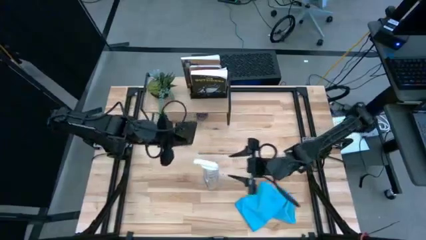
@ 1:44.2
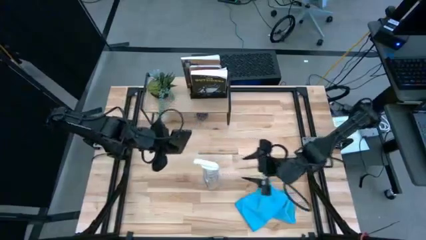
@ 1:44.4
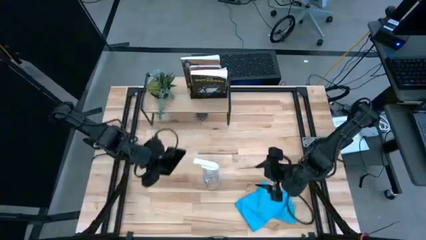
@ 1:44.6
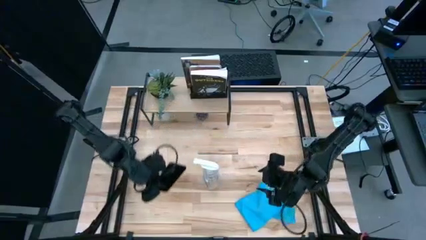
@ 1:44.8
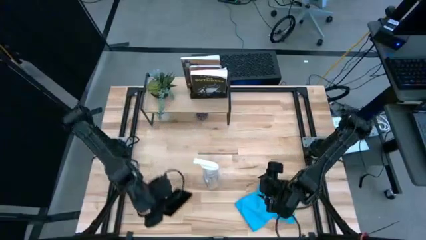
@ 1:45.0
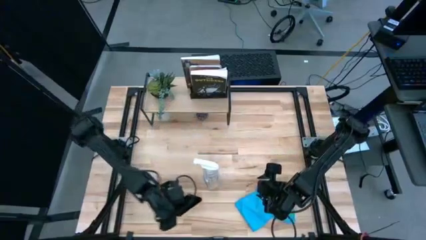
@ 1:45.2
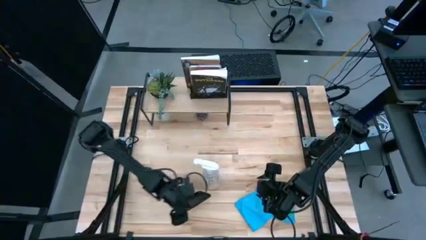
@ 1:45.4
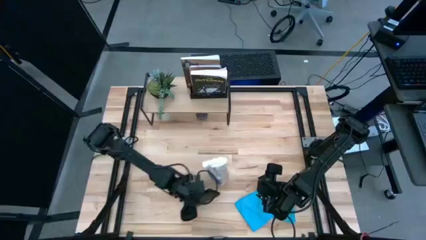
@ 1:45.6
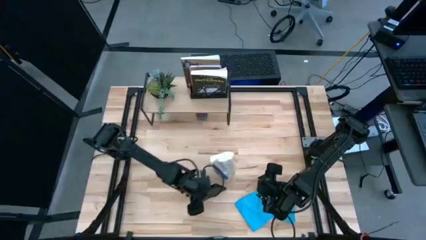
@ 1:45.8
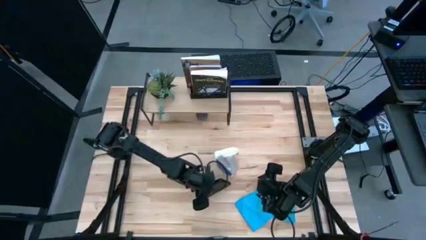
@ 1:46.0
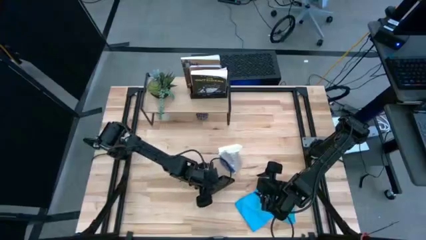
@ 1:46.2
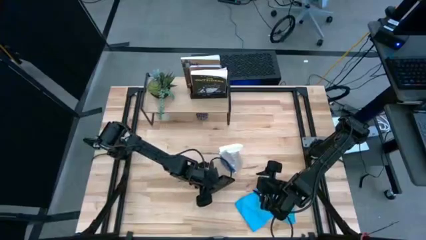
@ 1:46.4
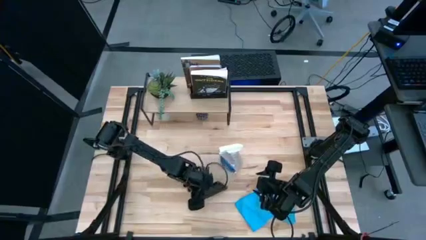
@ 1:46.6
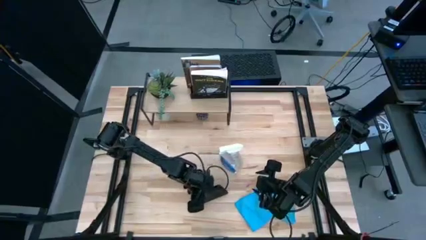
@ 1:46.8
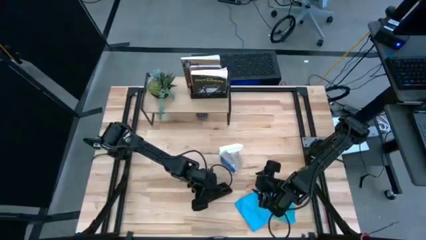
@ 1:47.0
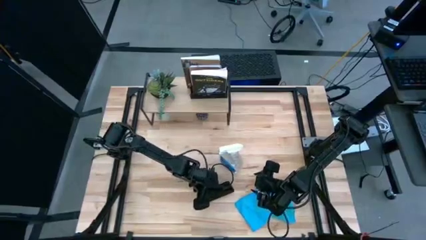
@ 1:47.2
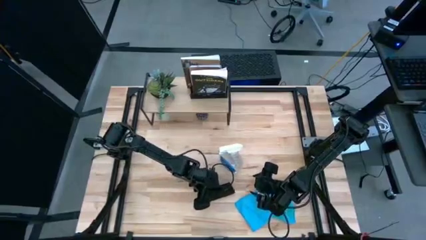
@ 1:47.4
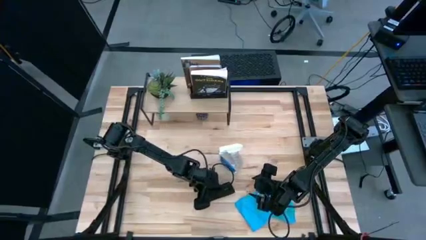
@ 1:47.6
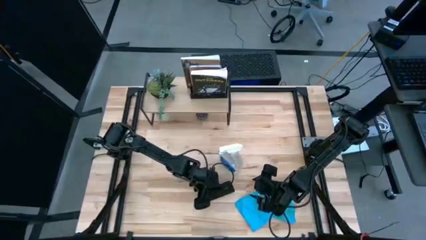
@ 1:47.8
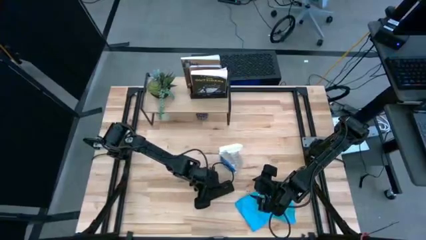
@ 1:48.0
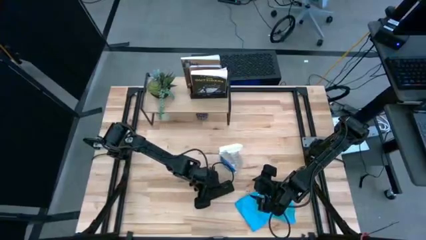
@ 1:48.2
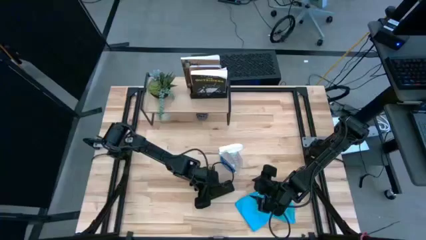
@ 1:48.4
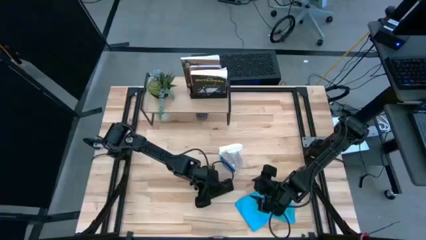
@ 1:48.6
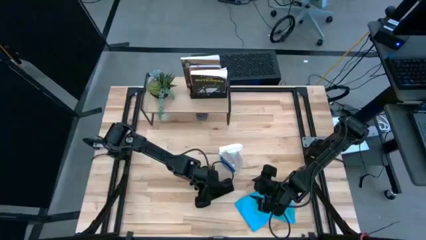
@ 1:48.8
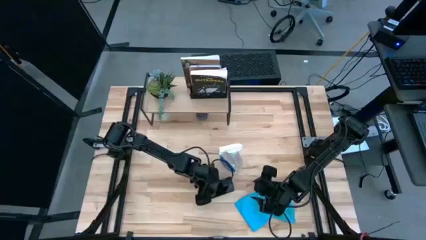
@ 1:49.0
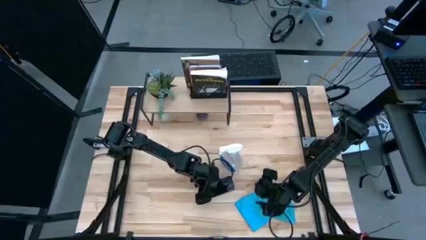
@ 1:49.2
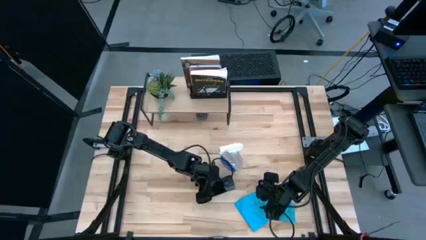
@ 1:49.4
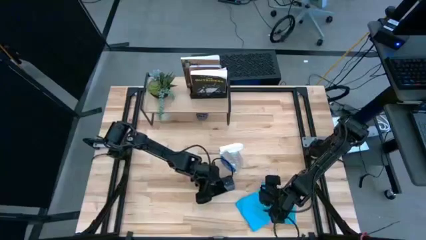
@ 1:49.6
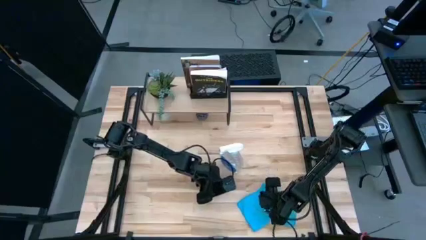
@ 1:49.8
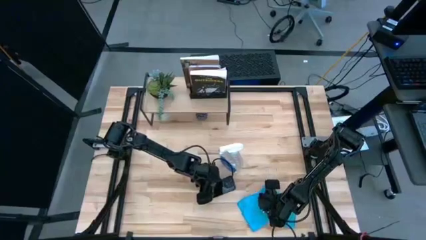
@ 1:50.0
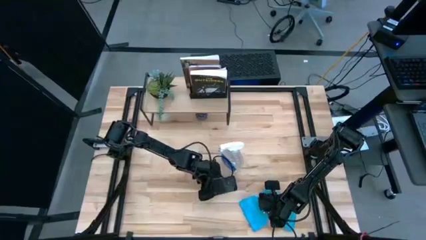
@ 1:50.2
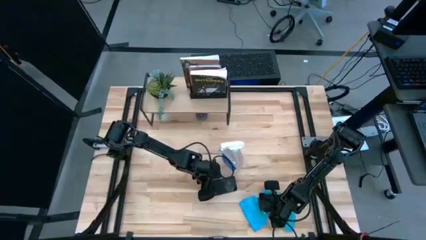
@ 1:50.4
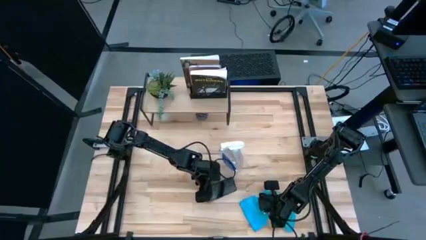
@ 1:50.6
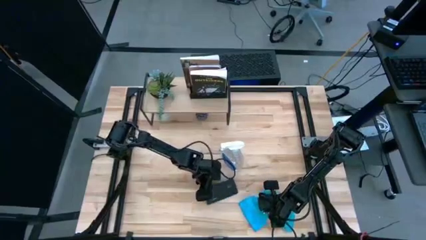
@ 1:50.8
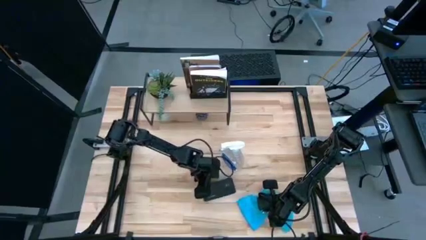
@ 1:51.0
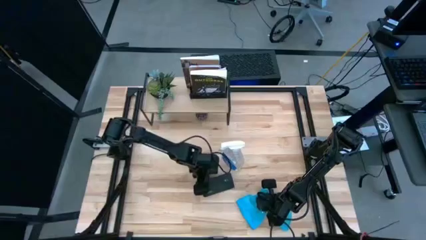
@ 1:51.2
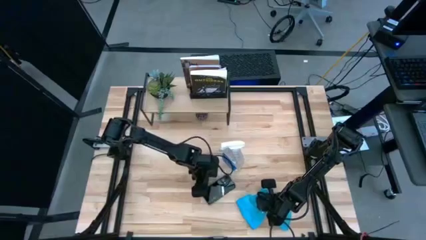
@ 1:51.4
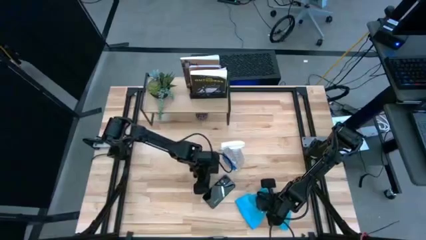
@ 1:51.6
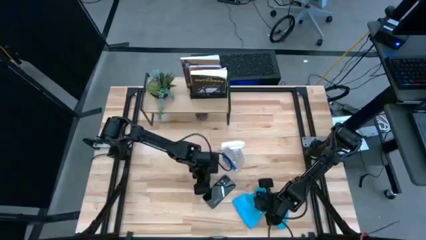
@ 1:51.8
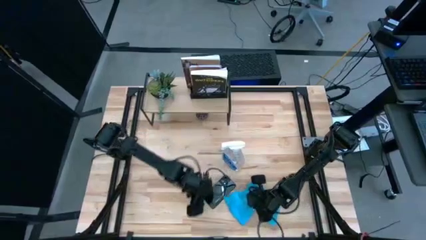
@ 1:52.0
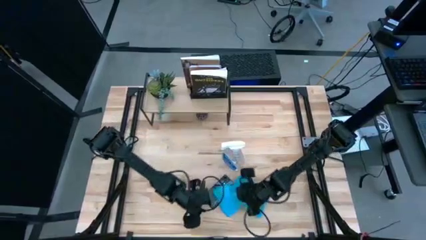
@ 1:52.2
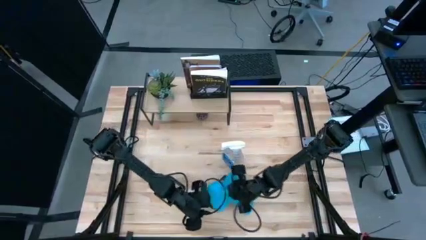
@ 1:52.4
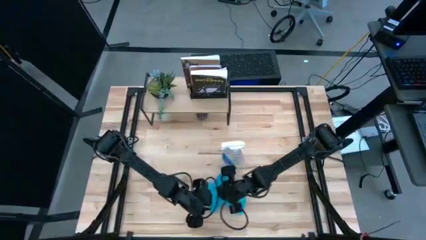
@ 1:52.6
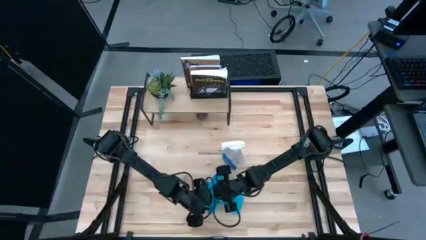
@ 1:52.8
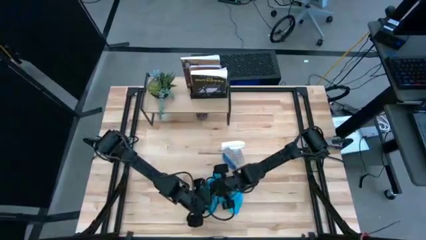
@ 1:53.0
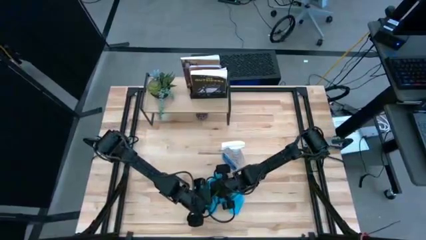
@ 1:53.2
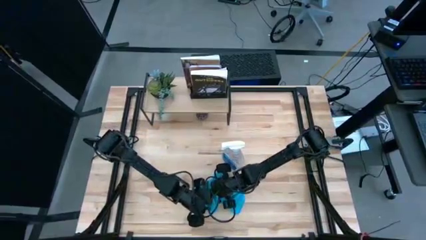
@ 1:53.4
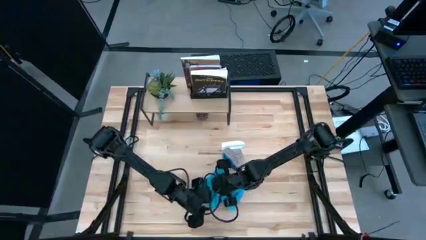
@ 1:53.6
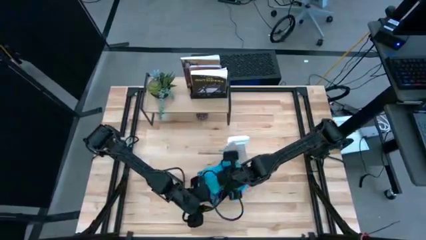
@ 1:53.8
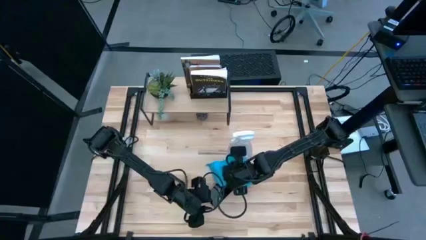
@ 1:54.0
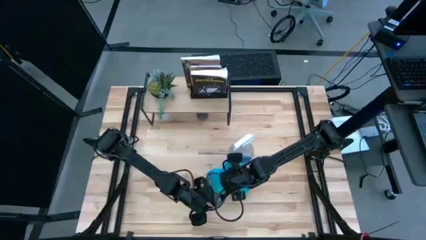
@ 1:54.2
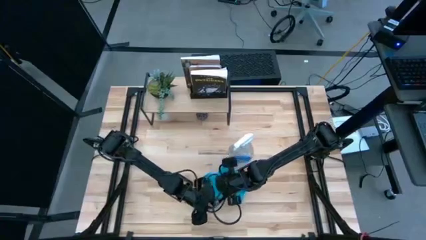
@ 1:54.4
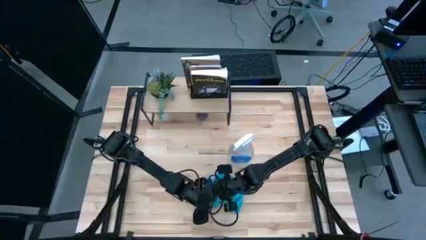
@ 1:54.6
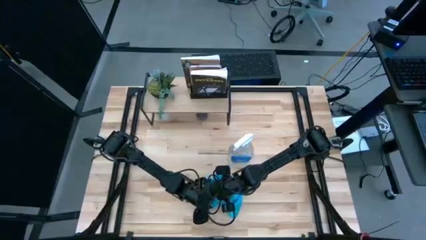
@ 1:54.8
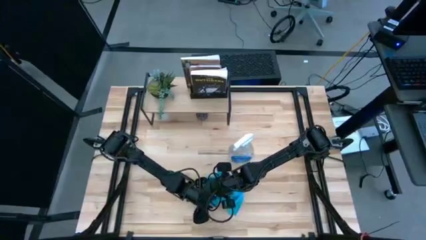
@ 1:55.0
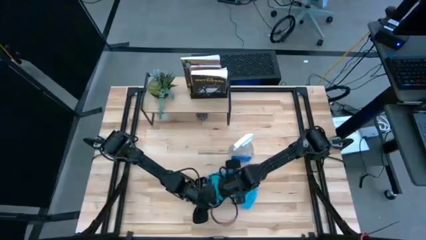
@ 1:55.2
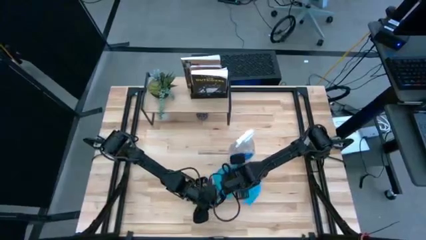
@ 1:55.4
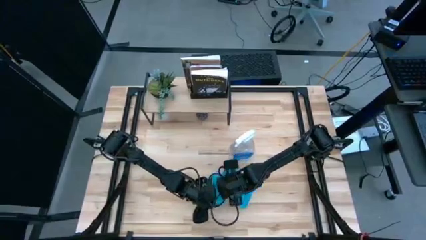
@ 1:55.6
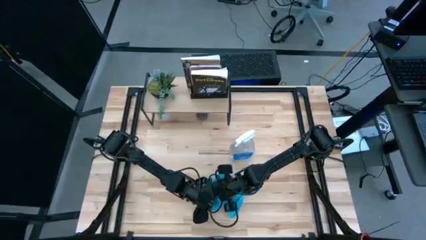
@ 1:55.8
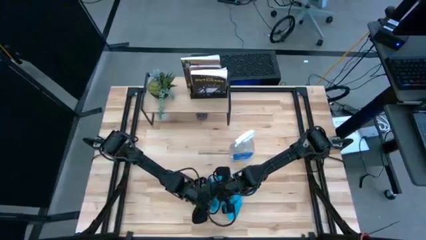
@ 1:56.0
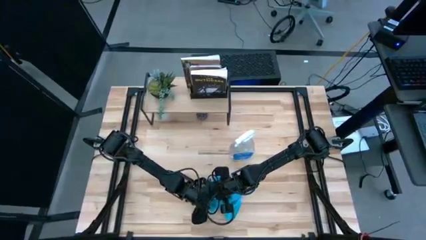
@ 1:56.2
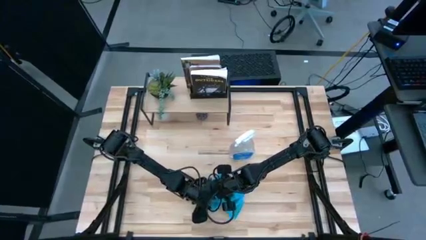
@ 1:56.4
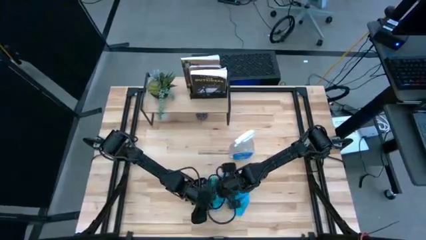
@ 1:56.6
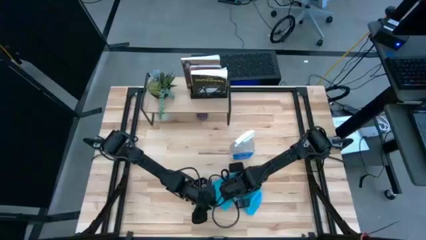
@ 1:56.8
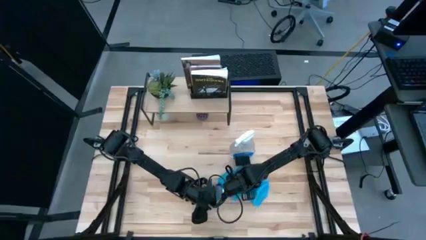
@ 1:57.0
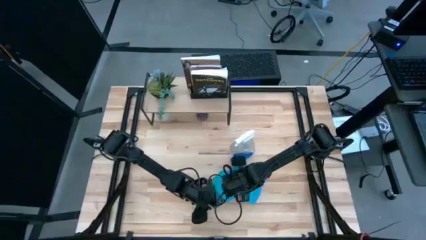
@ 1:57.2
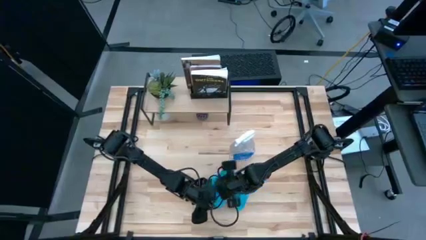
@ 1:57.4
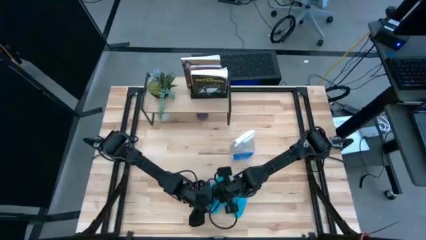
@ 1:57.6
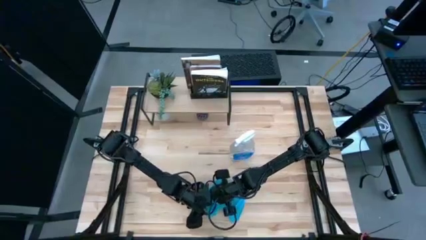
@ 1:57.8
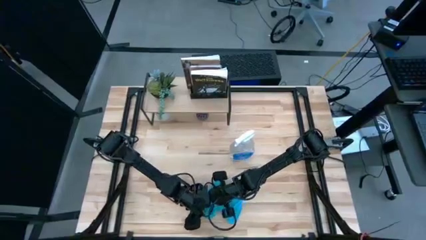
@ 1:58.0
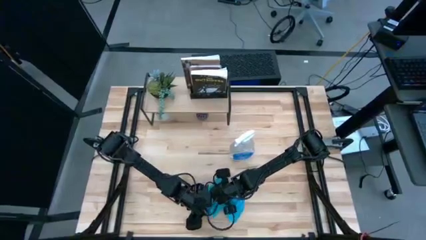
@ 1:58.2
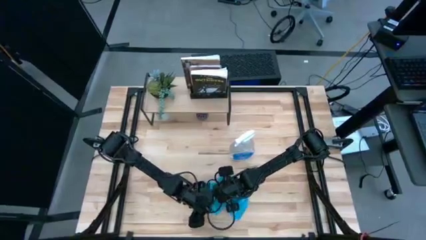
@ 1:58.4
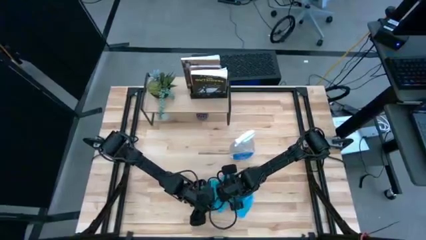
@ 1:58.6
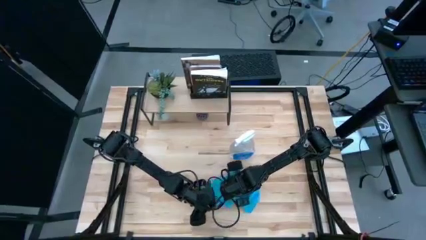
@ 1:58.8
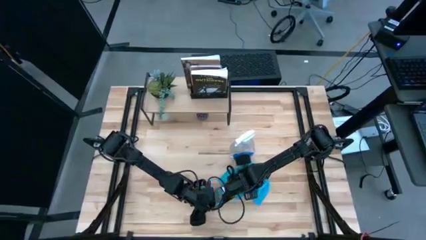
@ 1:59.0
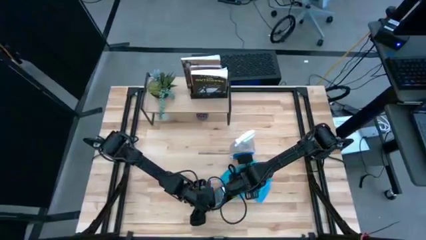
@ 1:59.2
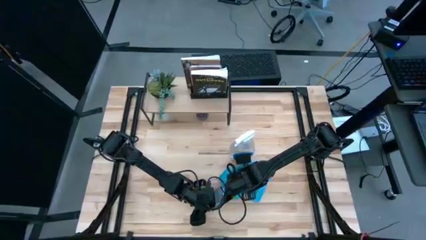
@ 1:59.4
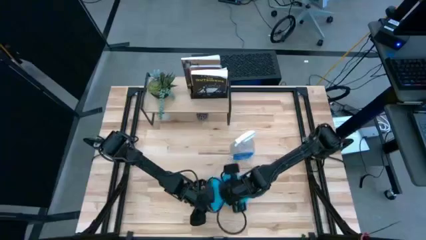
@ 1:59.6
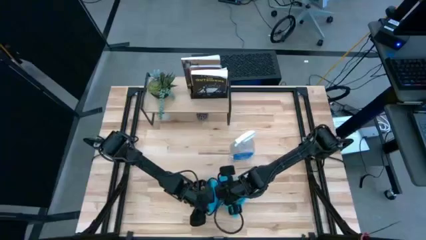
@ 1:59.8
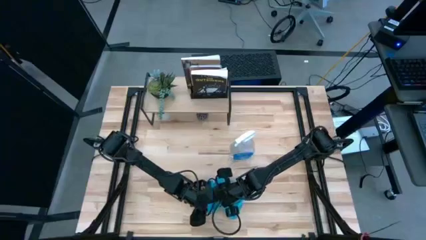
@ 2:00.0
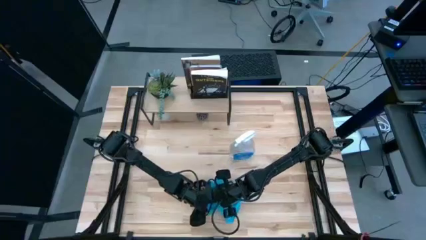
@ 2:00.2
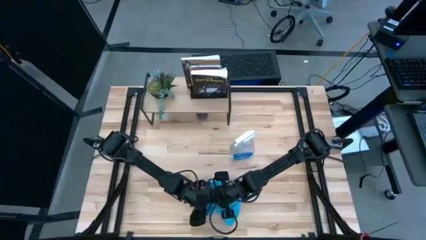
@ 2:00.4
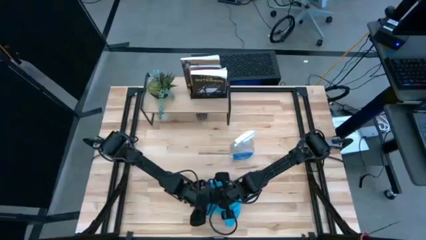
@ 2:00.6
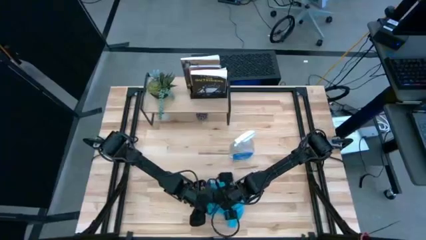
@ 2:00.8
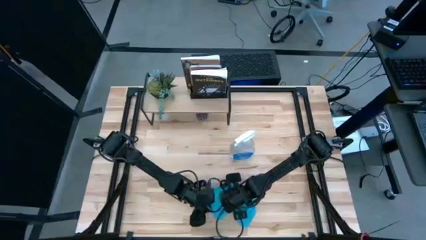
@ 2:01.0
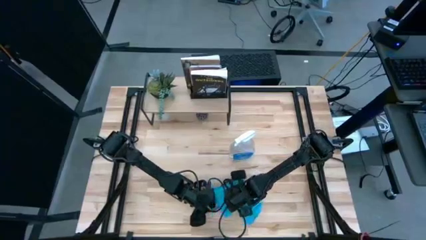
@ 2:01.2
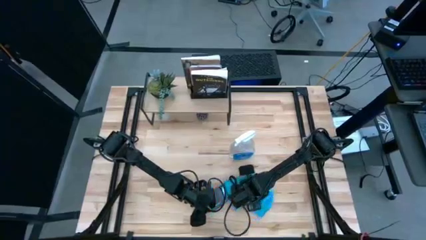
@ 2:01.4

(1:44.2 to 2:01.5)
Task: Apply microfiber cloth
Wipe the back of the black cellphone with a blue microfiber cloth
